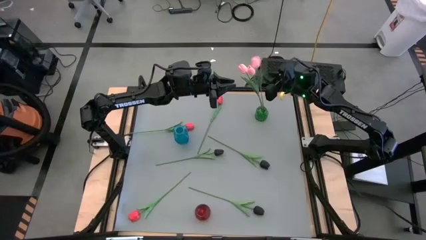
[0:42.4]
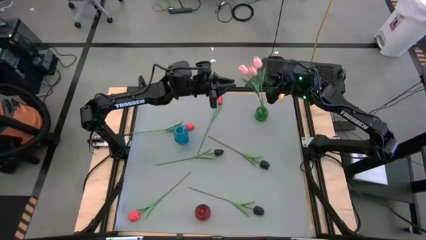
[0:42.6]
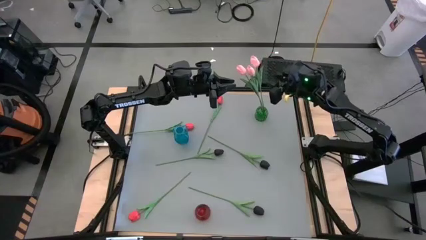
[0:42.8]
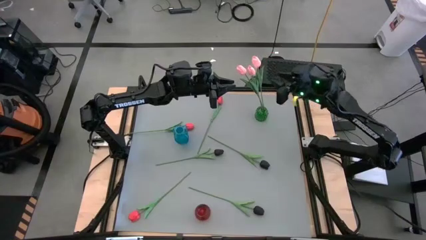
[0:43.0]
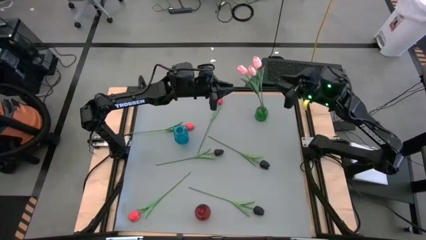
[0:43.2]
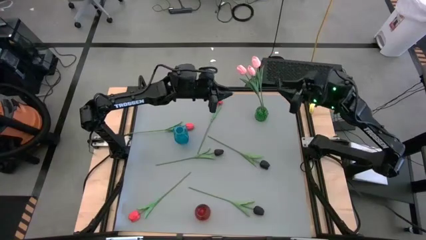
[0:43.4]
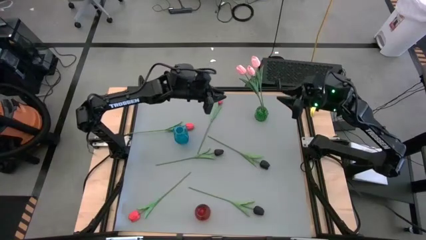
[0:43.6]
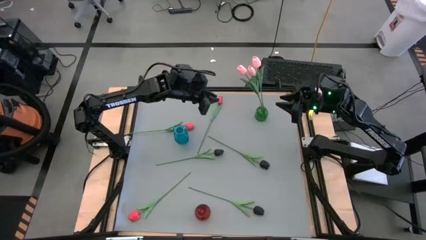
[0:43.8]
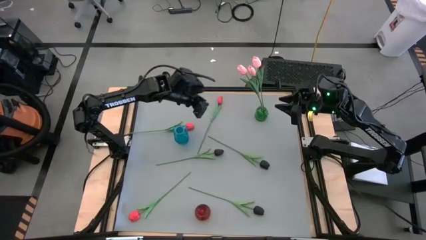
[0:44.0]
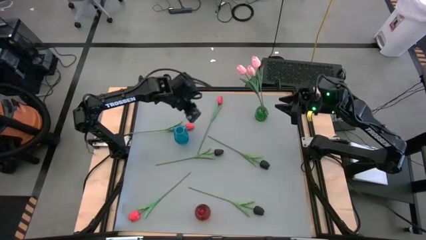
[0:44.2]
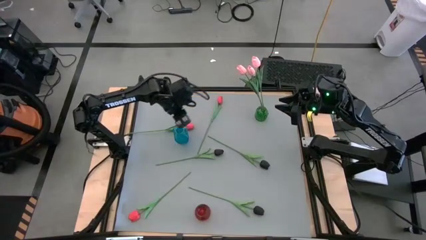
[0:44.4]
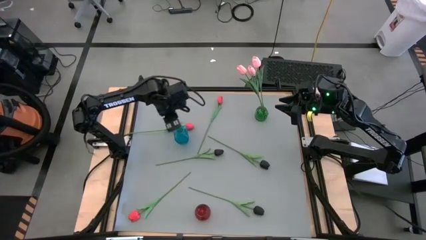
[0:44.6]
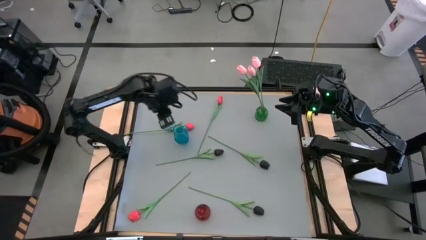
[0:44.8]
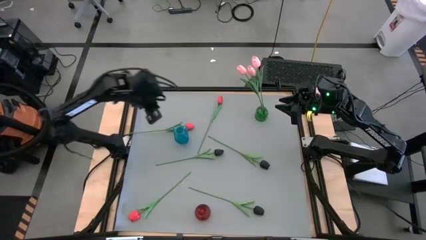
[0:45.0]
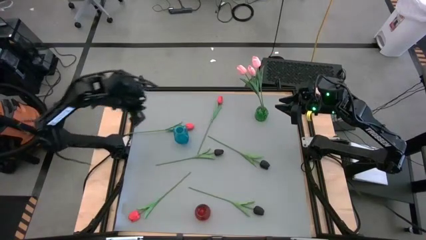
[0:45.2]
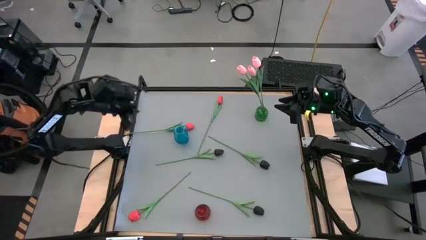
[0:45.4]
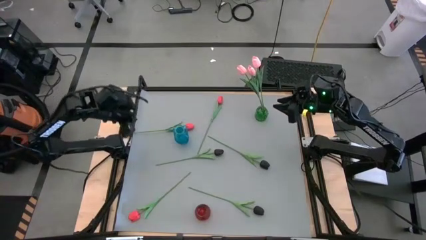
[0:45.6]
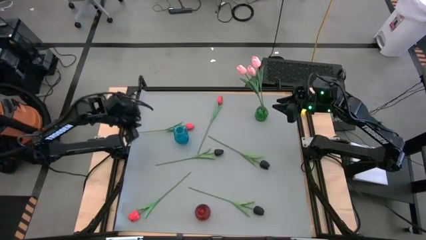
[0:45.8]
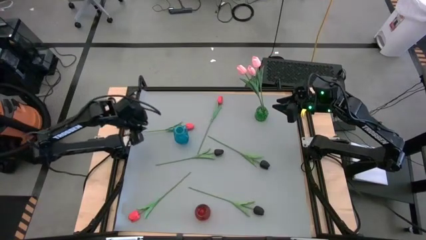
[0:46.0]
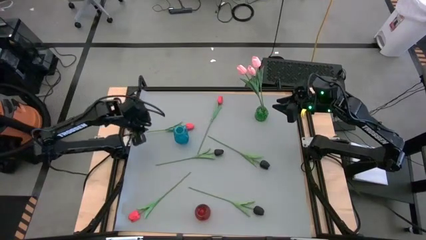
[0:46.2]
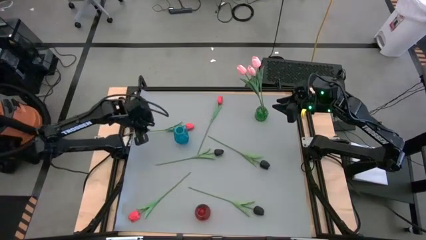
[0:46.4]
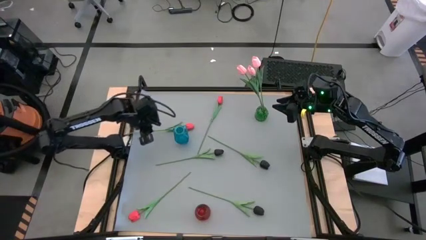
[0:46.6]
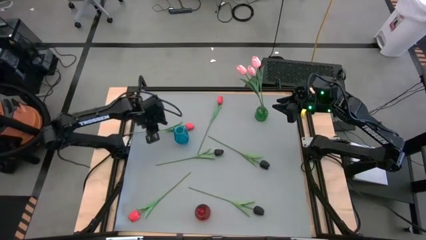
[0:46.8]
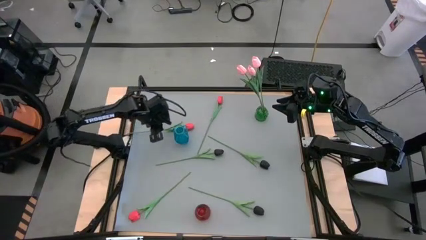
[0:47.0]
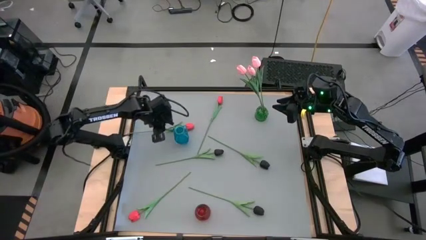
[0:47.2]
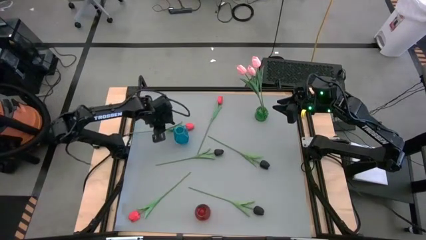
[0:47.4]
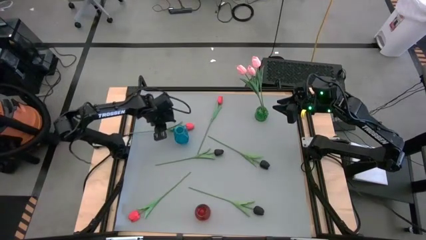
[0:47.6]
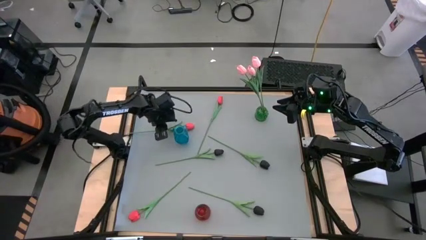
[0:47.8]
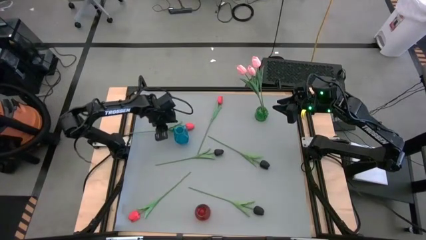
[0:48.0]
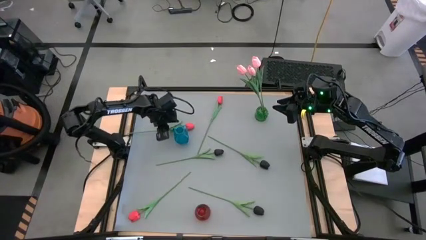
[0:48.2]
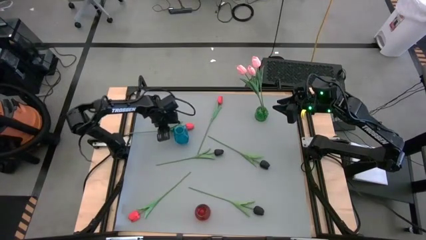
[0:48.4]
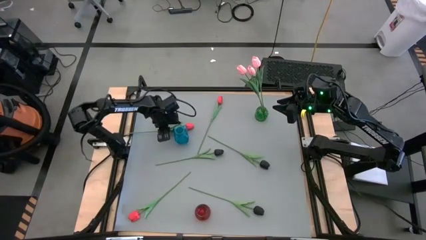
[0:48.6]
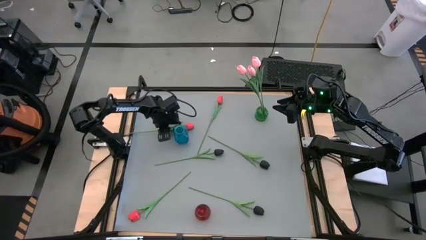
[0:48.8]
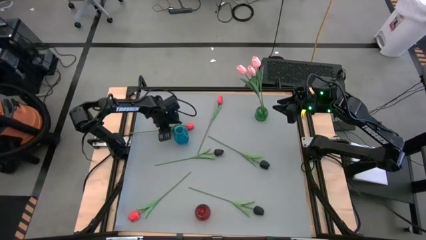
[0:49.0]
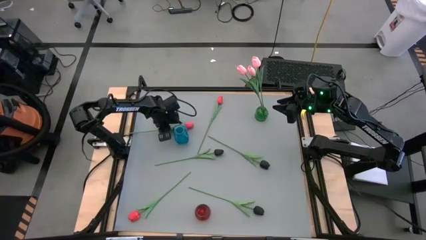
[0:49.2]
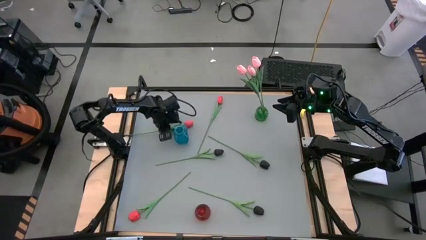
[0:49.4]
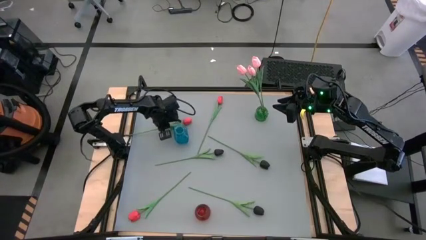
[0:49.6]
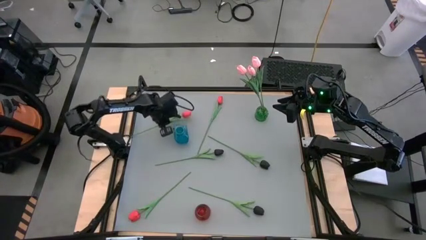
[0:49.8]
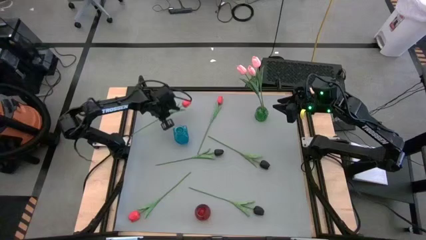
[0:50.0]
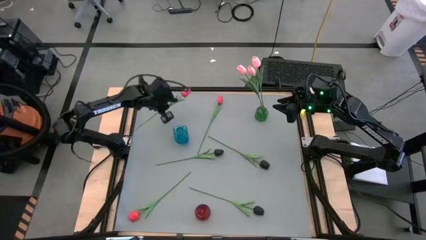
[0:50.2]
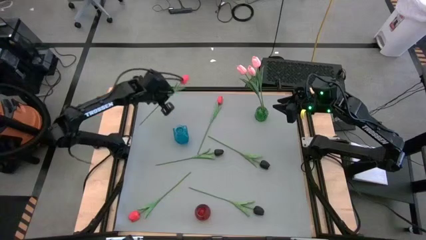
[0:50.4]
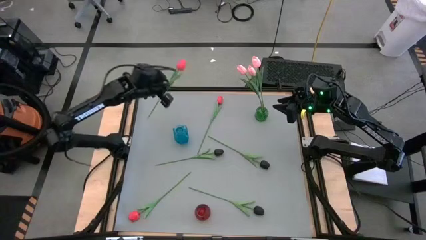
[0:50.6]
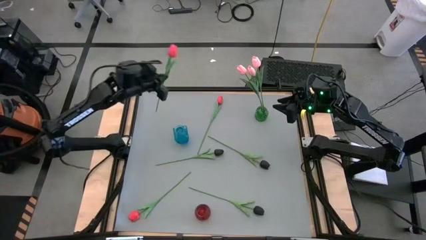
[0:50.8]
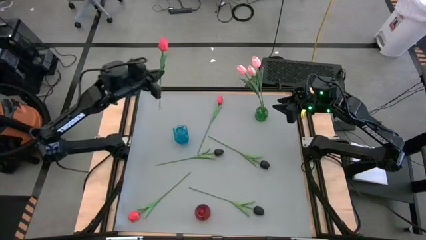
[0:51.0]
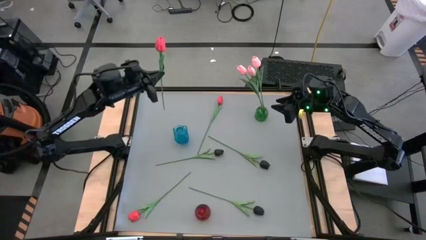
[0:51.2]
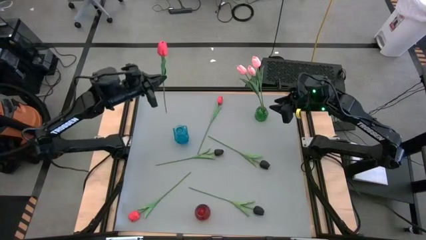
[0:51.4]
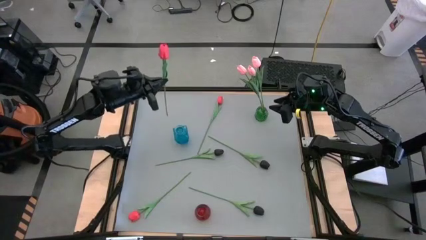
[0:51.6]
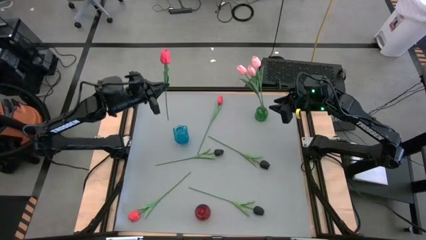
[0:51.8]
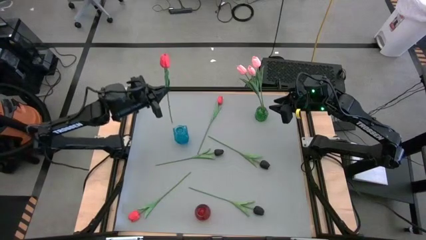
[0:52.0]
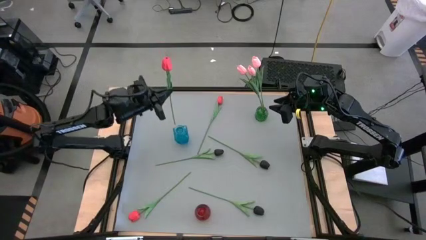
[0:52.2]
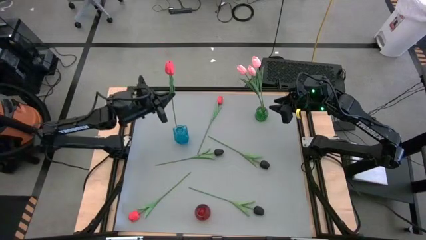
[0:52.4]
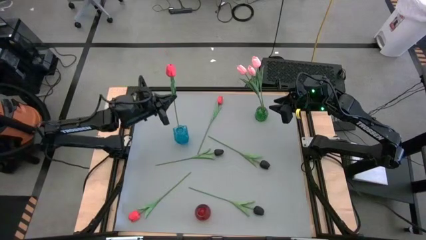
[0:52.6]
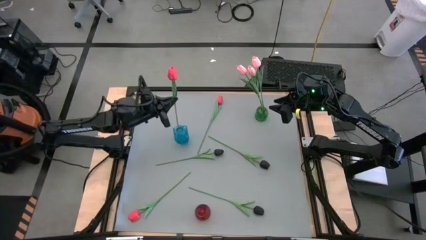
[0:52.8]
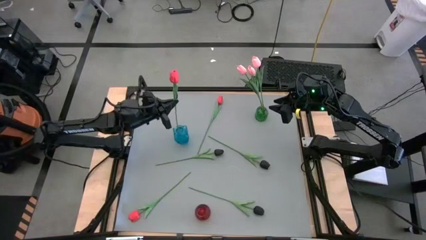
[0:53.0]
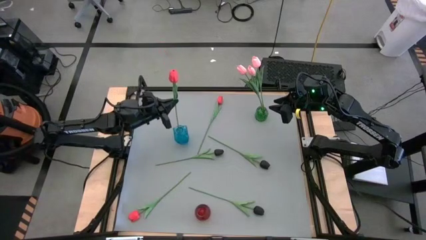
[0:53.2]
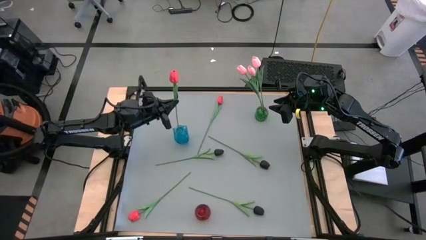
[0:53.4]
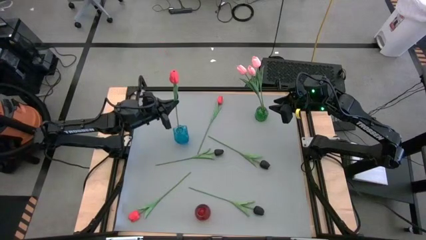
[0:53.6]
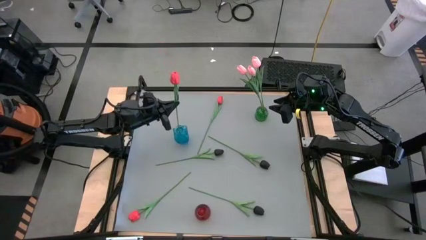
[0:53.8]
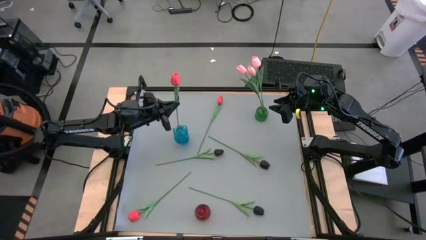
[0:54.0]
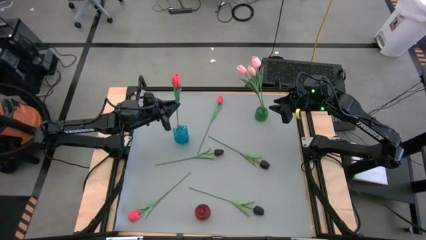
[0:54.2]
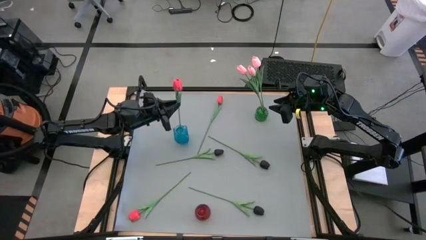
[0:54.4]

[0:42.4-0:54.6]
Task: Sort flowers into vase by color
Put the top left red flower into the blue vase
